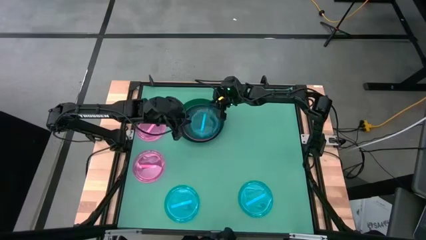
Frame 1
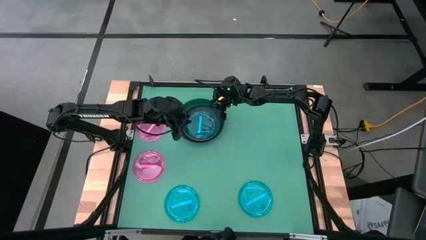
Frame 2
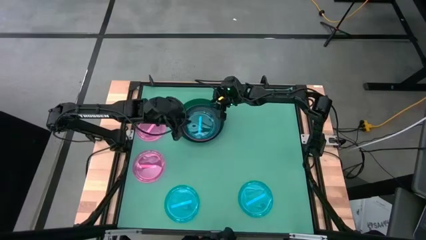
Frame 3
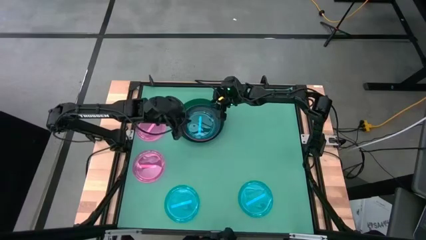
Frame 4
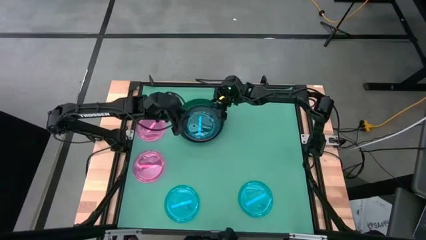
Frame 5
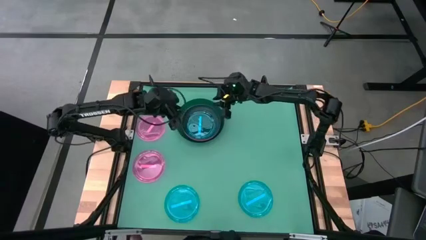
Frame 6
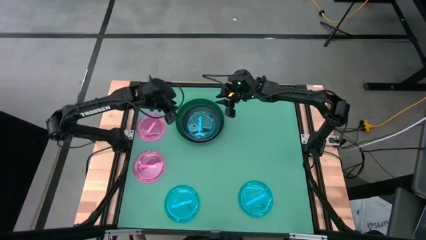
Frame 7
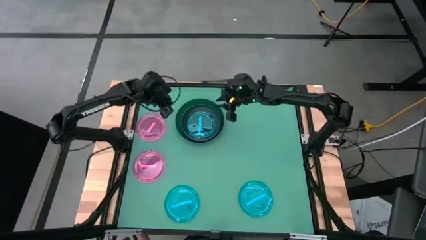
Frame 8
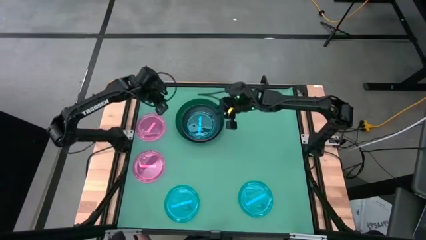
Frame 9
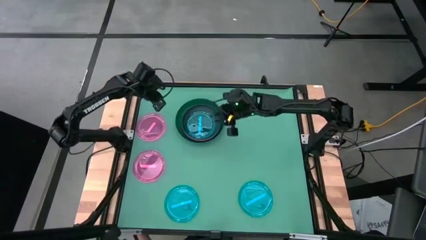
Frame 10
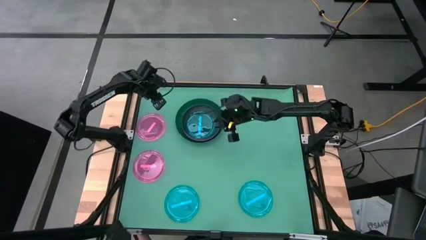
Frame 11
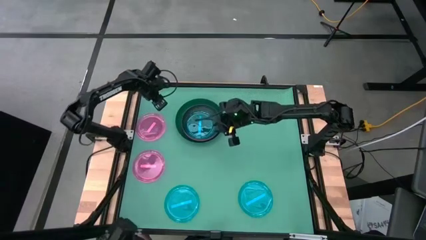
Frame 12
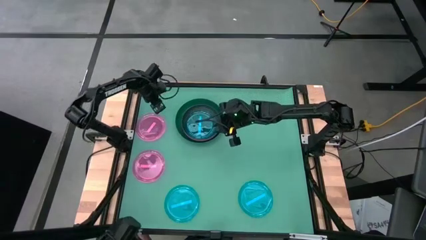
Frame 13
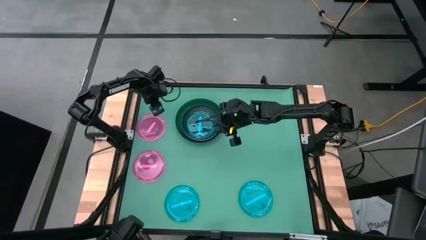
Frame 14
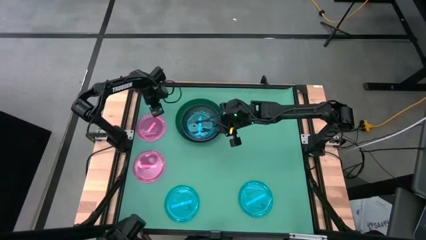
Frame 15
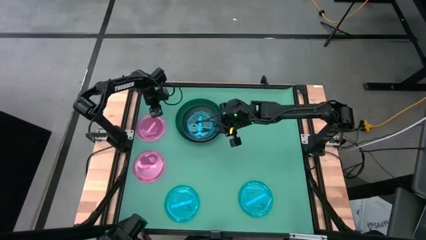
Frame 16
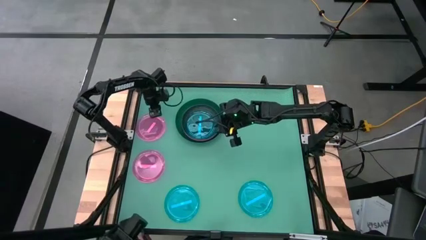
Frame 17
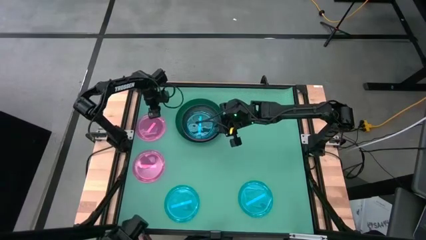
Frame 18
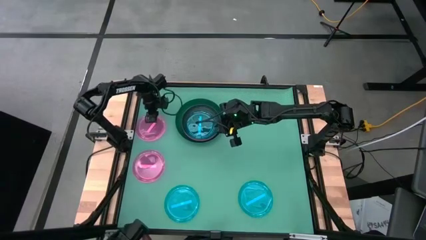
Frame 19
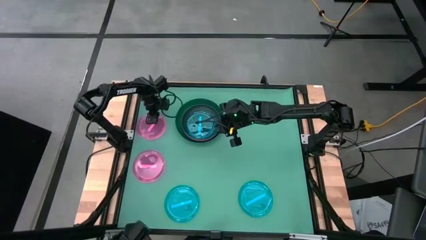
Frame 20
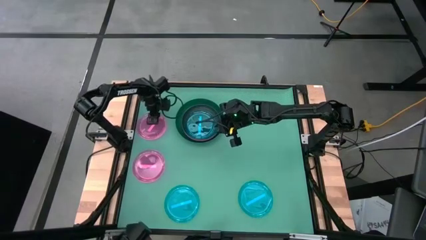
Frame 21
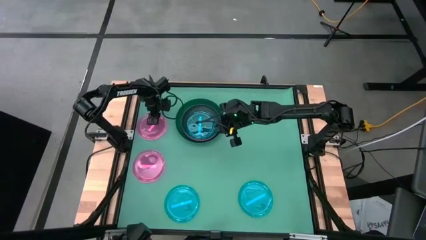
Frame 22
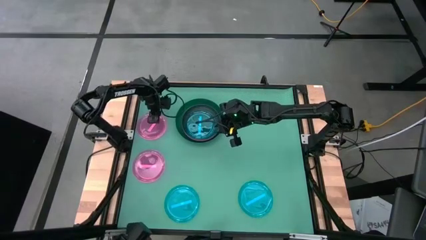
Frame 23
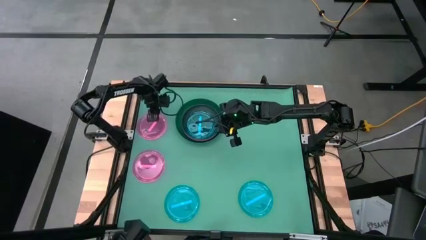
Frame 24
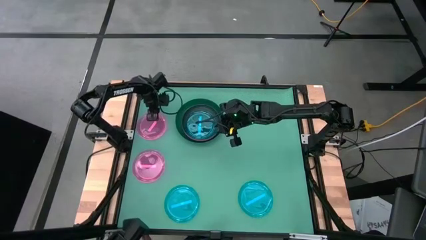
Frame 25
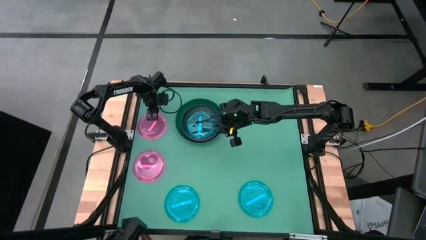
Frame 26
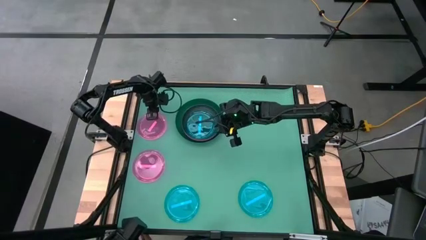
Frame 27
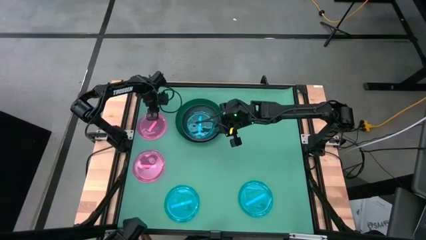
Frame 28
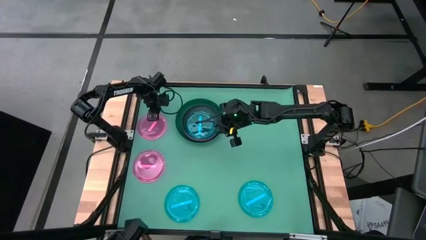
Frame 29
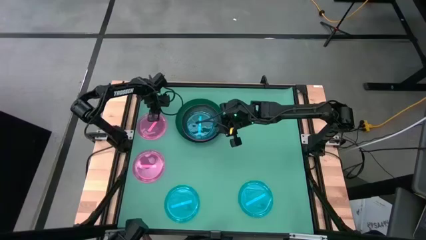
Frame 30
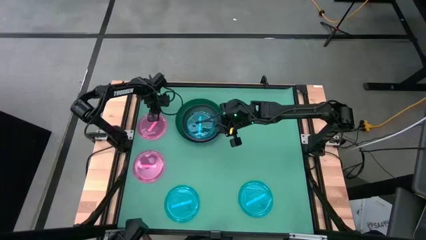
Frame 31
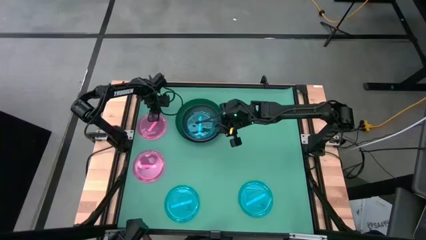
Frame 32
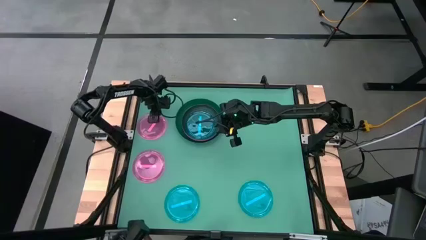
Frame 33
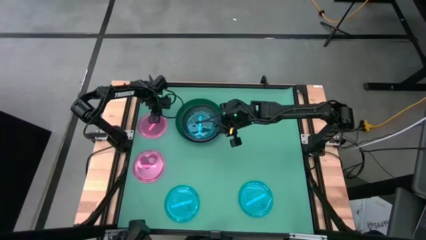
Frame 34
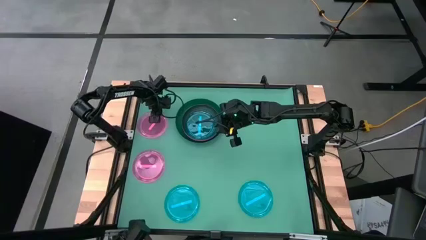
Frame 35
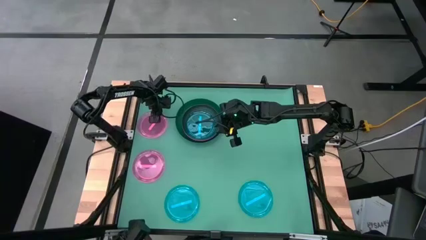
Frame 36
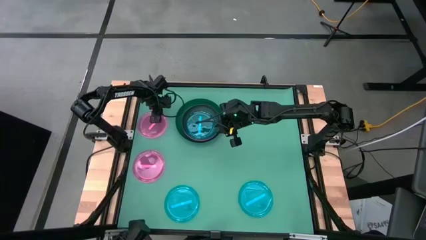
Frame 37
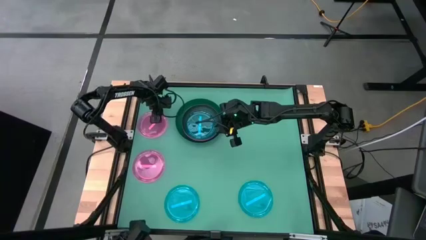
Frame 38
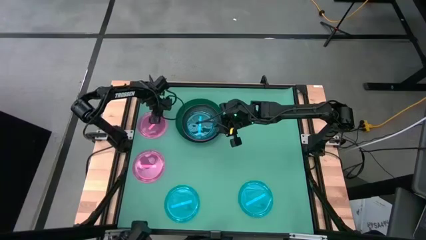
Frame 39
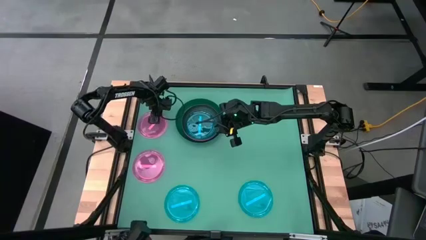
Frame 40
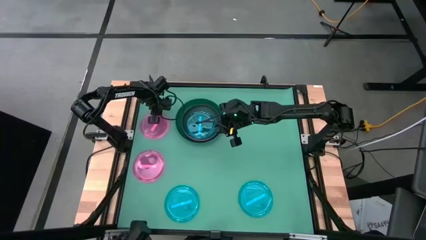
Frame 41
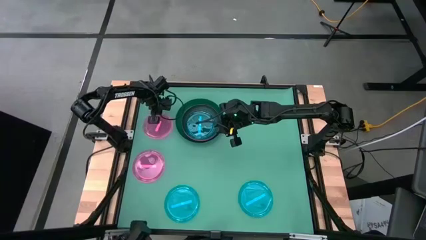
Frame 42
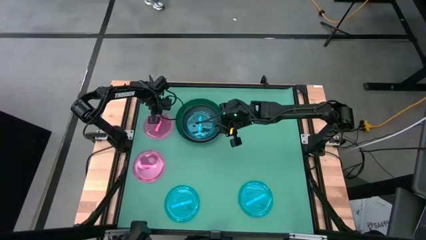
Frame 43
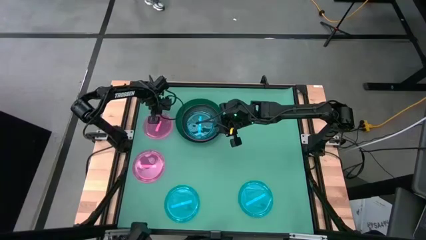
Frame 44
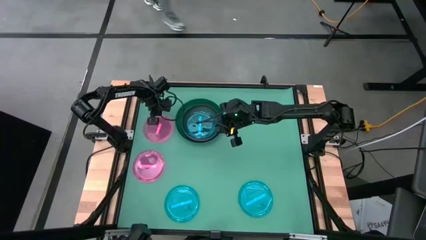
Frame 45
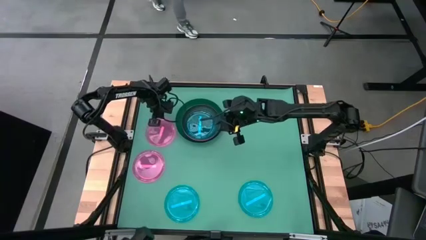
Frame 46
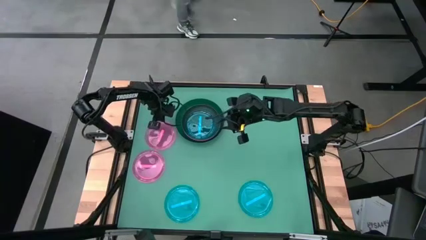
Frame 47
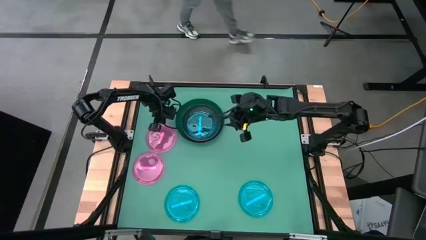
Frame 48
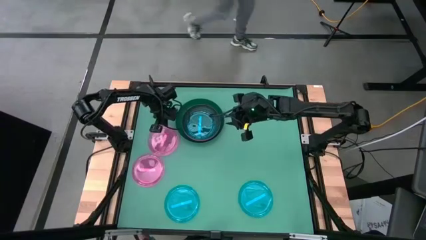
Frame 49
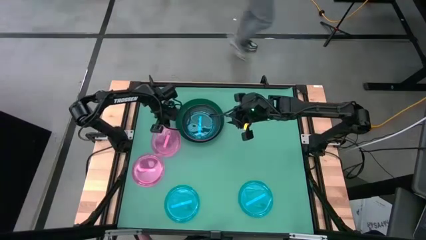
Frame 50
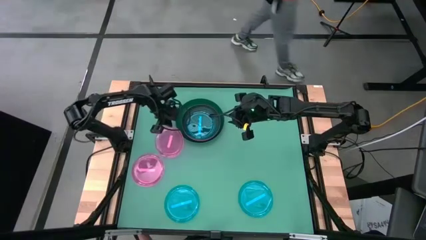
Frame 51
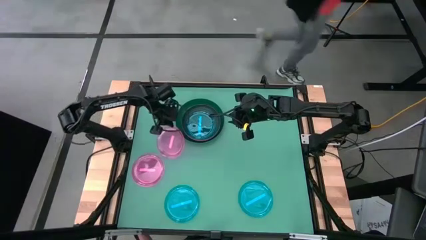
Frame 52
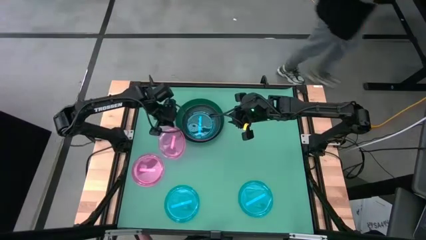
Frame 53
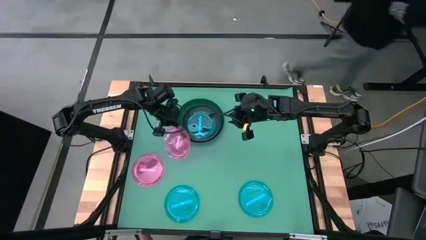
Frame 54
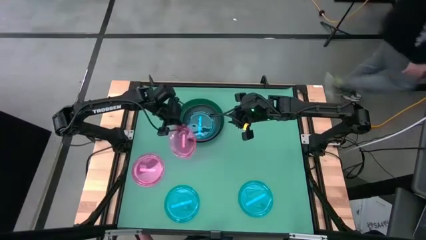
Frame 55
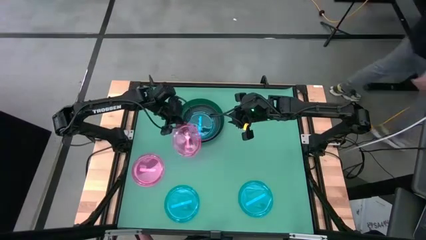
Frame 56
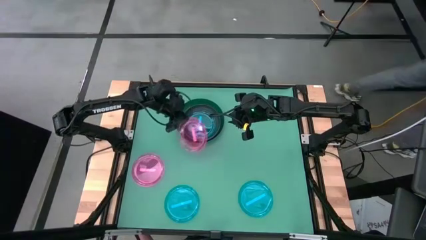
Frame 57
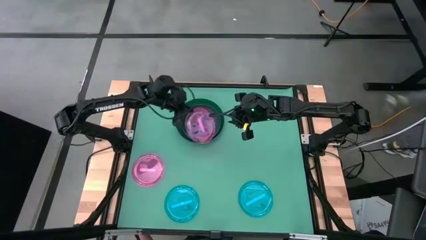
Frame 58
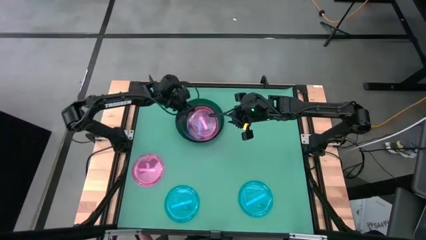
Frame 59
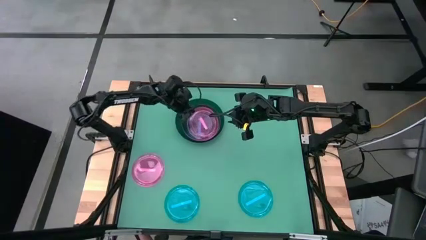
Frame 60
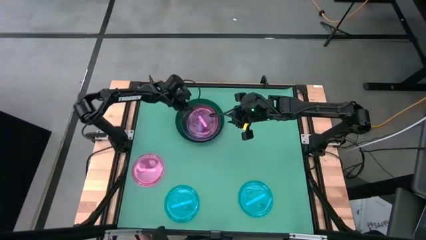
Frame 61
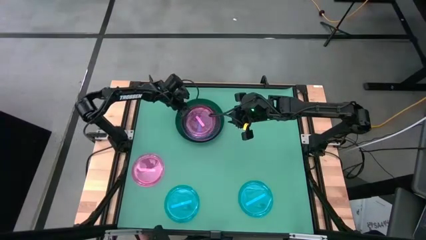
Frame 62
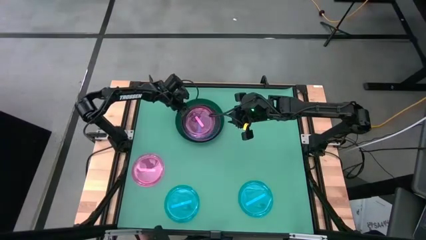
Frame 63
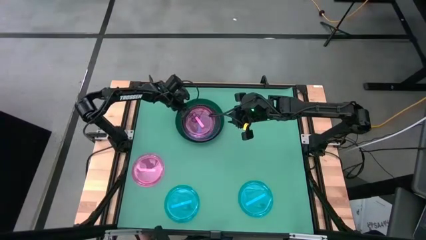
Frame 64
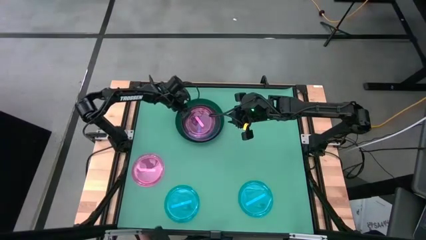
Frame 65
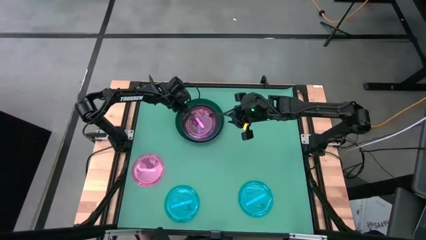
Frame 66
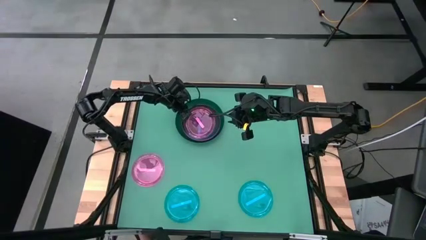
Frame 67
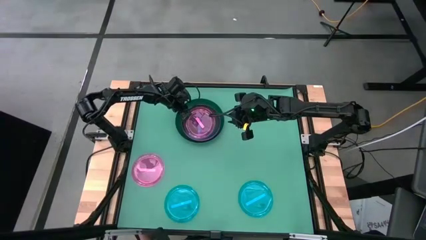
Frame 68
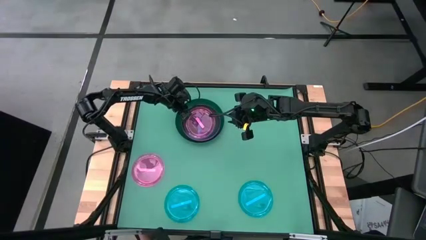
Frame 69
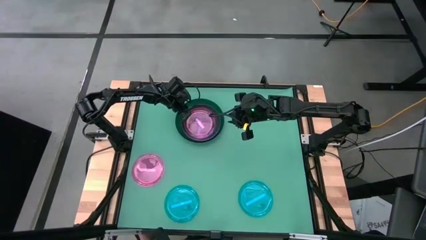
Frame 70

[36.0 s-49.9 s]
Task: Stack plastic plates
Stack the top light pink plate on top of the blue plate
